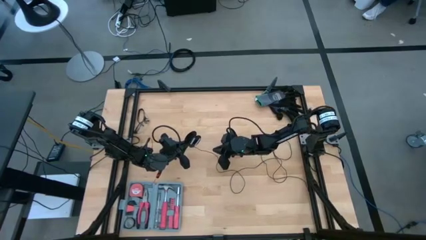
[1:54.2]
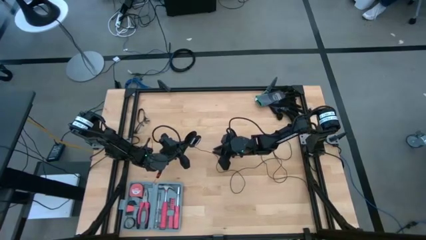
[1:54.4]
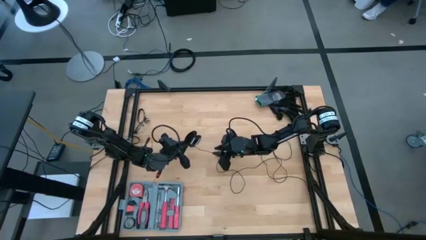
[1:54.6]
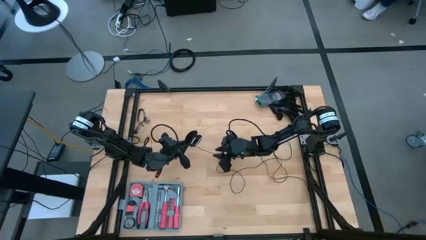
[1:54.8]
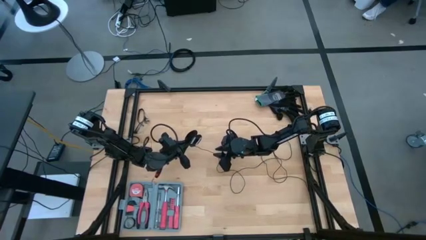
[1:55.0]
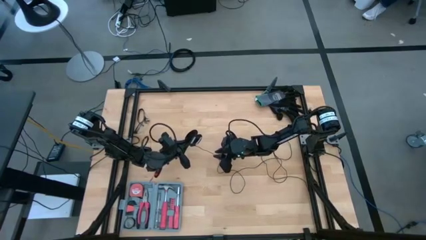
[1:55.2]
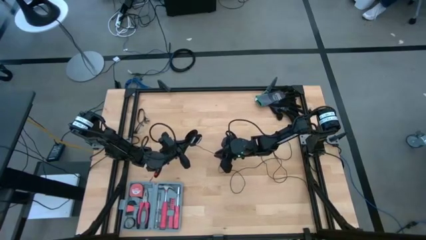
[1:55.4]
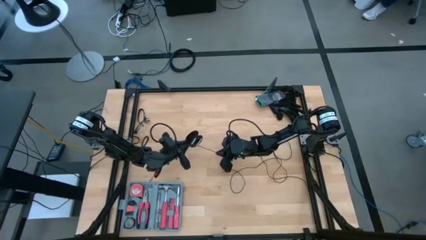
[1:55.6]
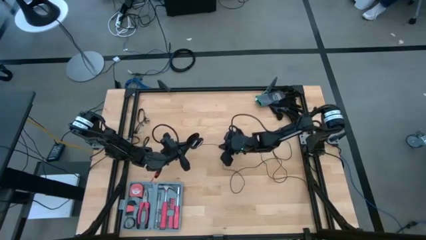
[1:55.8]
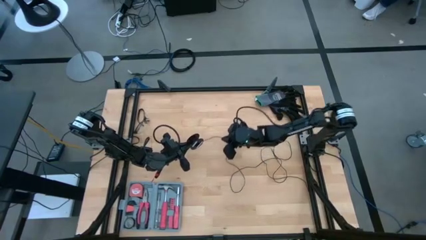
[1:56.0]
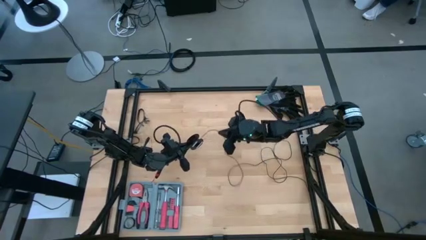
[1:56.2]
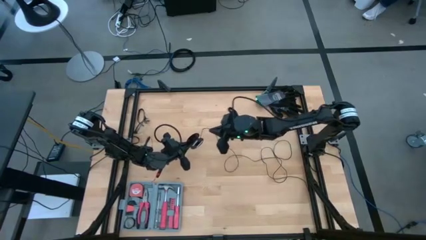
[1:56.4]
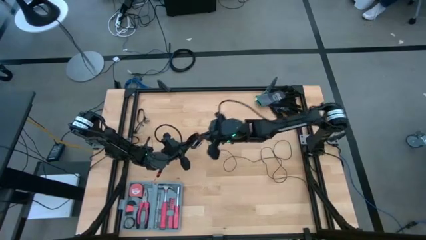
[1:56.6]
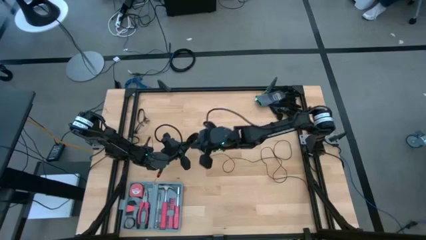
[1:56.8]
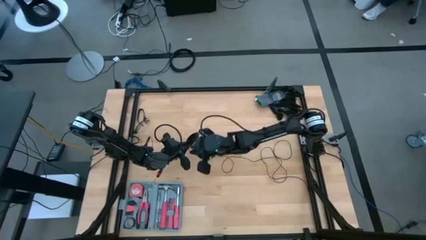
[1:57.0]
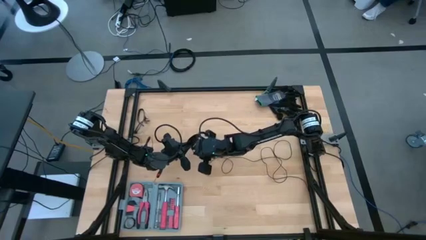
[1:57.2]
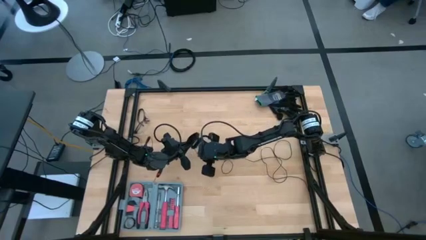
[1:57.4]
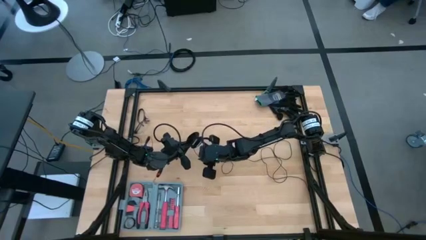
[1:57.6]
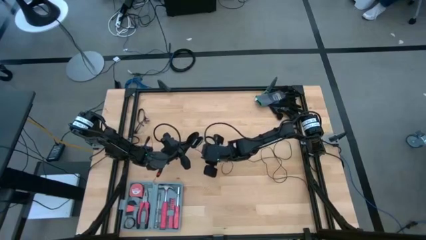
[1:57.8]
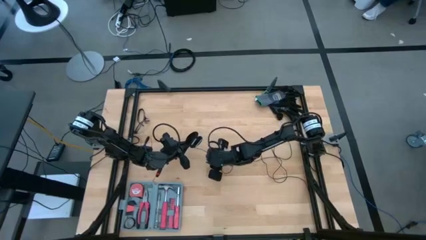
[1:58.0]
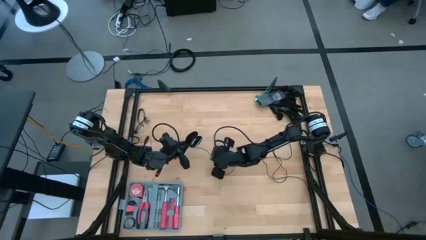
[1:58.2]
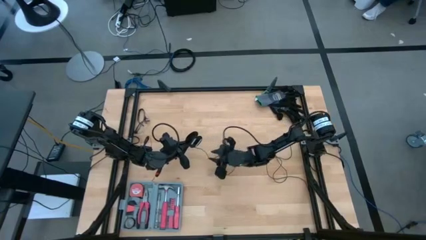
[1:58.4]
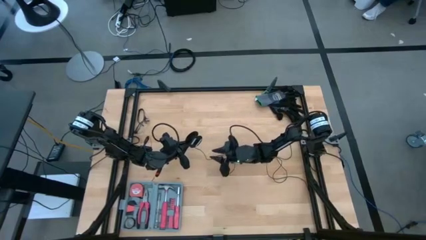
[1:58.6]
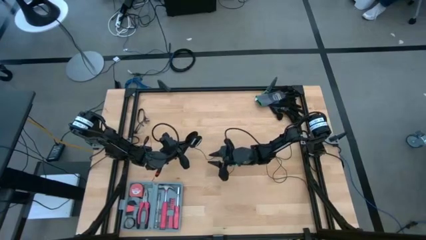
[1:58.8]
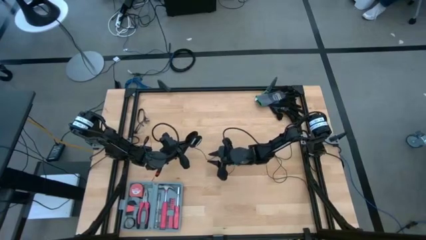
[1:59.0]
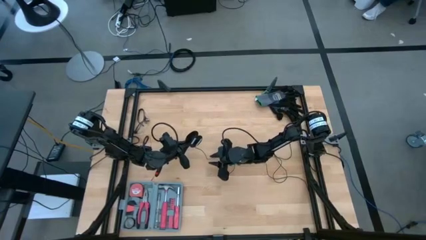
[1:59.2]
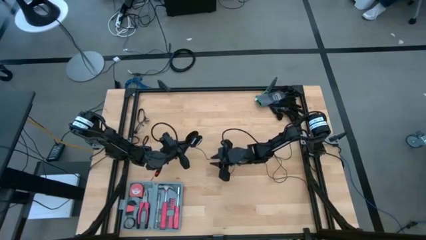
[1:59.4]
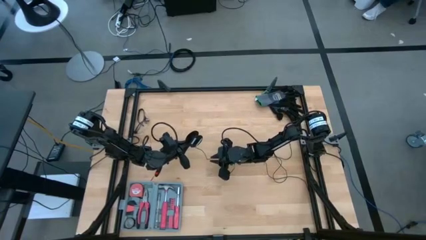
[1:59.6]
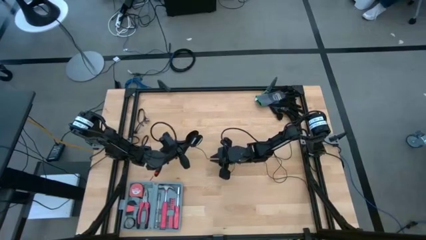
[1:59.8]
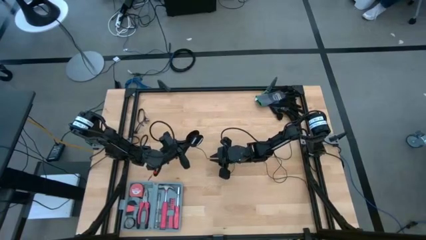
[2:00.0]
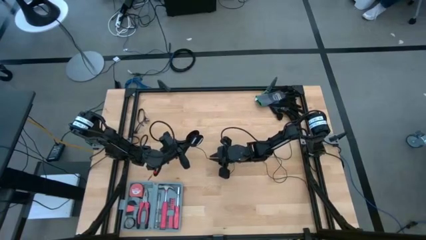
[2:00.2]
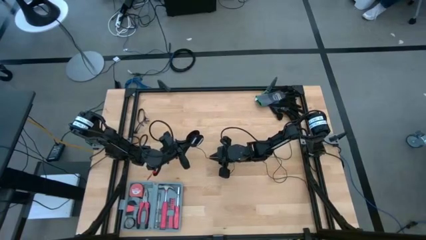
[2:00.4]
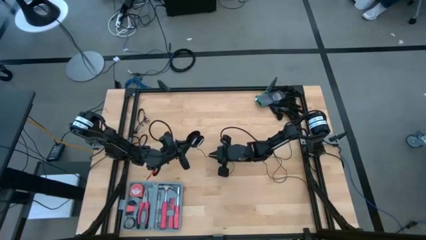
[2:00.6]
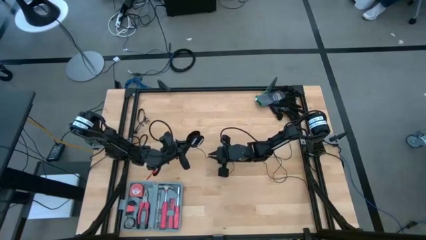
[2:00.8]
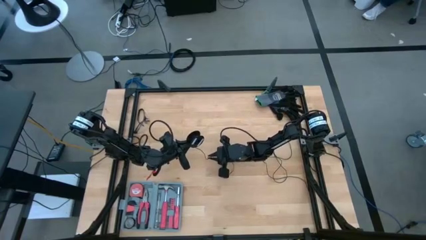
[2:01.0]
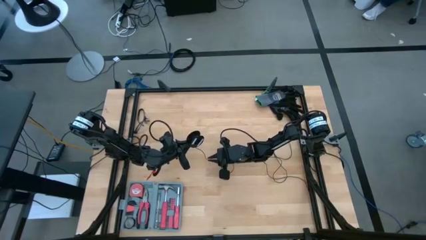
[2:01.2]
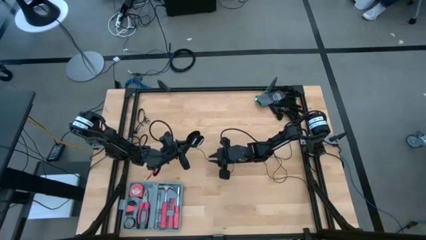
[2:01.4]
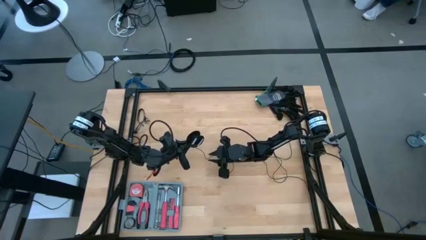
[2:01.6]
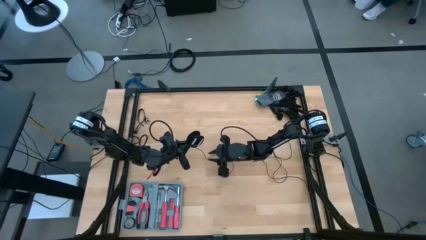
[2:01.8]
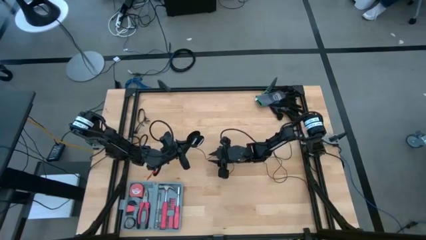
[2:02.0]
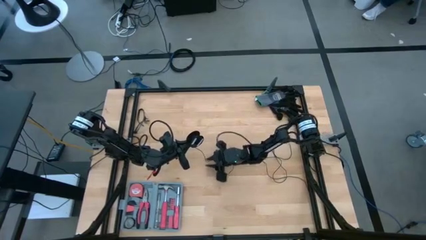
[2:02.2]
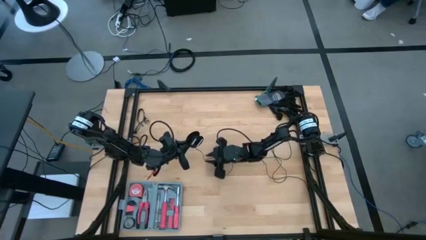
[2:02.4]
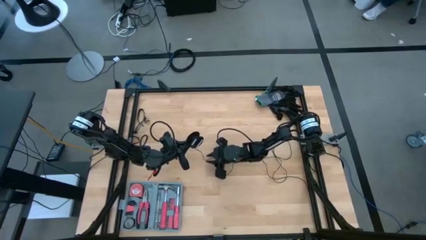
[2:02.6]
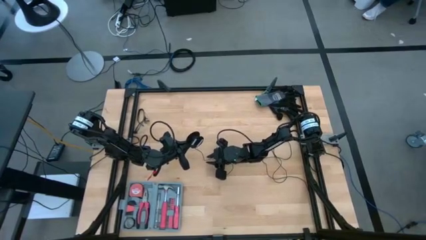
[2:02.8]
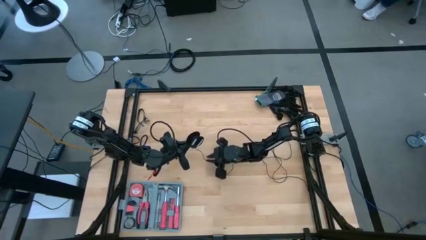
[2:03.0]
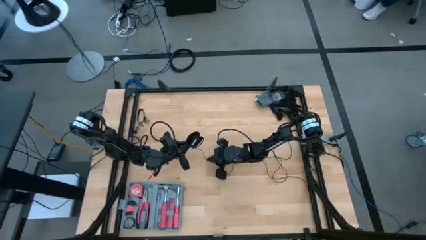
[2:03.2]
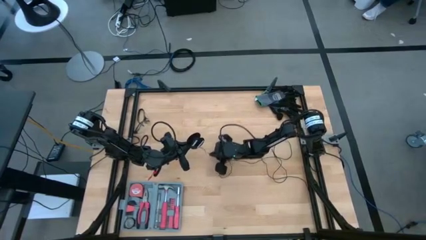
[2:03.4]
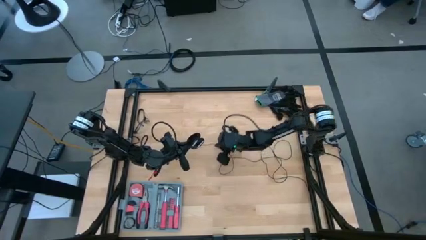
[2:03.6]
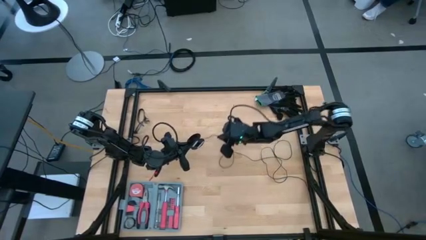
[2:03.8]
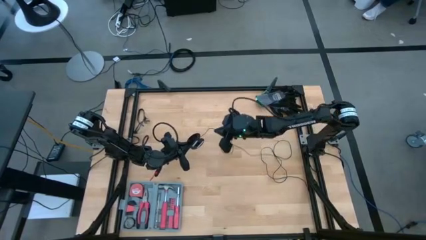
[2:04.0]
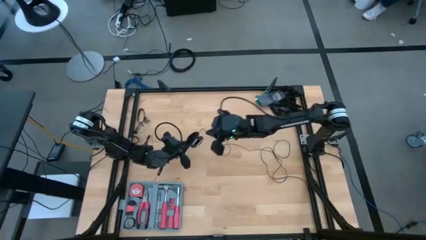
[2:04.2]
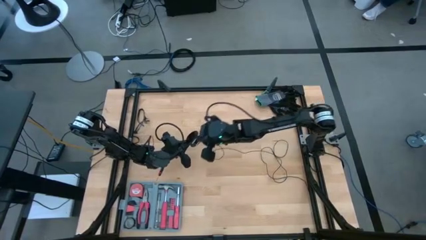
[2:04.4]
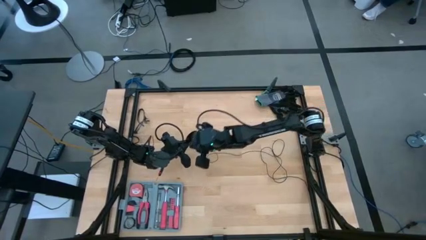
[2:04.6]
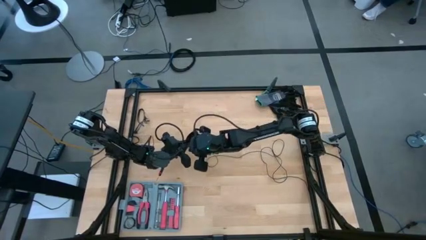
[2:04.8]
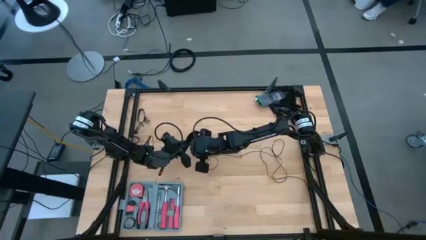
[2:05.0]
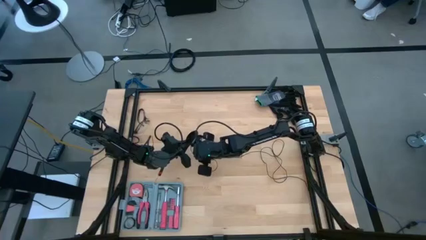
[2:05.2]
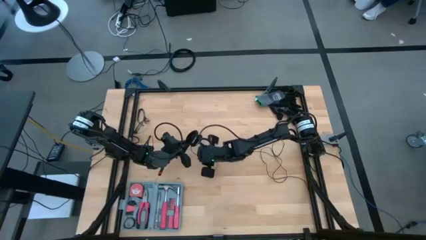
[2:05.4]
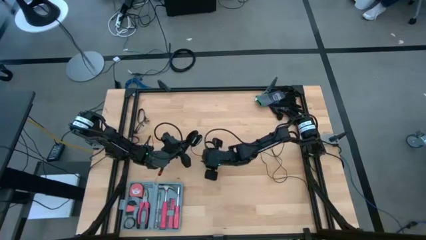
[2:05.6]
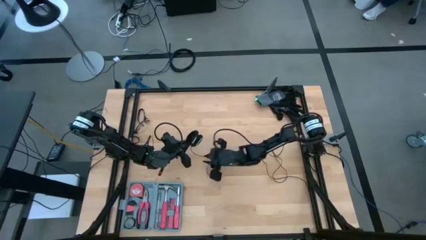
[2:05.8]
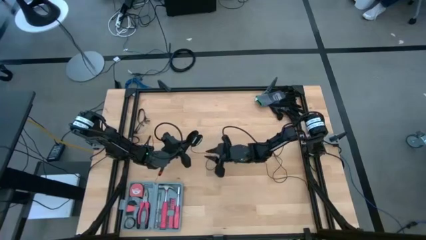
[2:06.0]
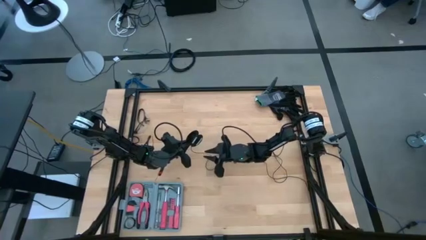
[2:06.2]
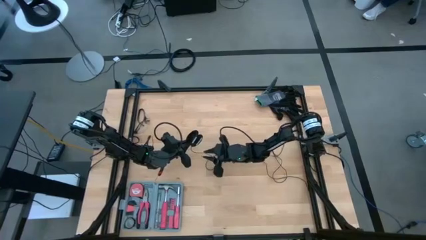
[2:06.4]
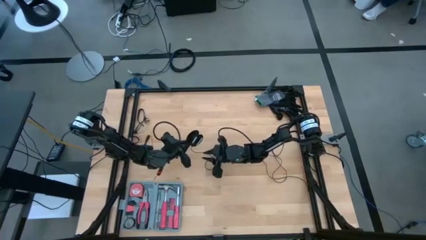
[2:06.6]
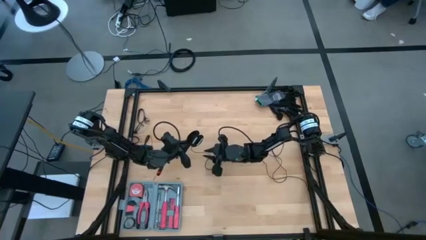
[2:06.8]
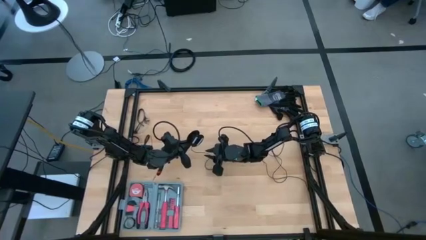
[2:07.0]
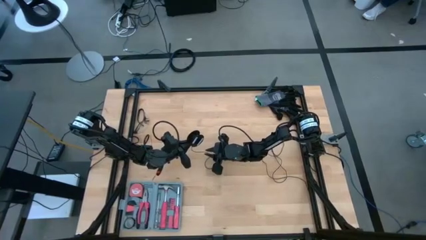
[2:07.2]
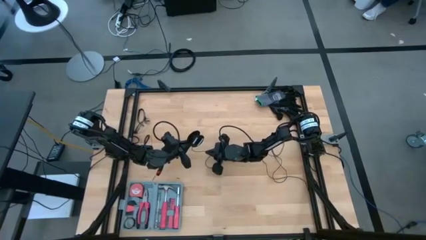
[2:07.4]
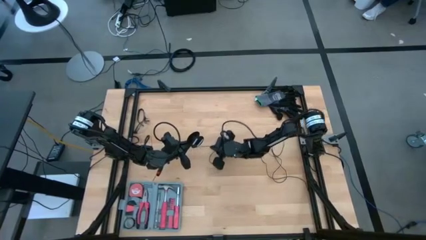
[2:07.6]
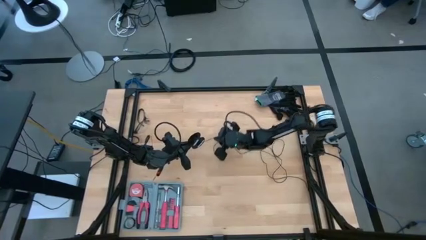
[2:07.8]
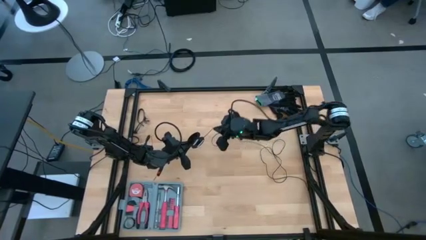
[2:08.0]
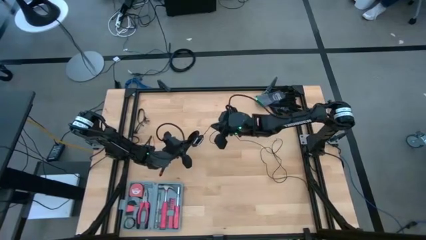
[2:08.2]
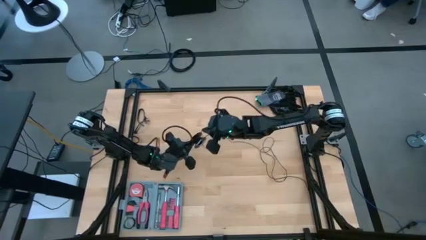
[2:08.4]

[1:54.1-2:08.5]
Task: Coil cords
Coil the black wire onto the spool
